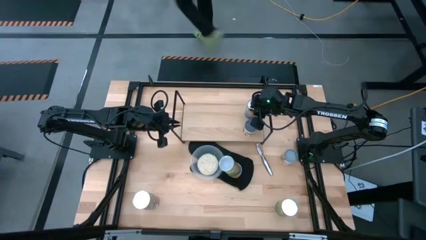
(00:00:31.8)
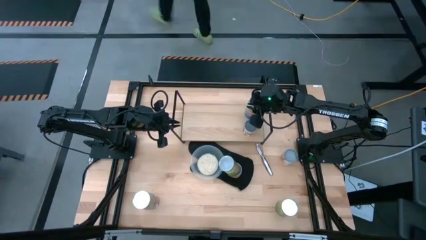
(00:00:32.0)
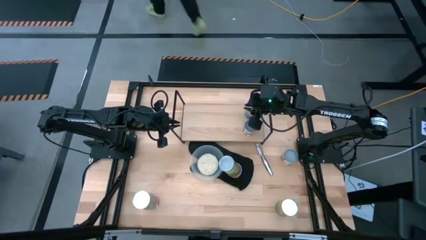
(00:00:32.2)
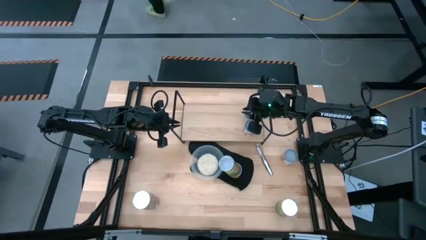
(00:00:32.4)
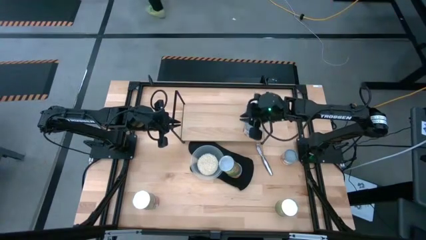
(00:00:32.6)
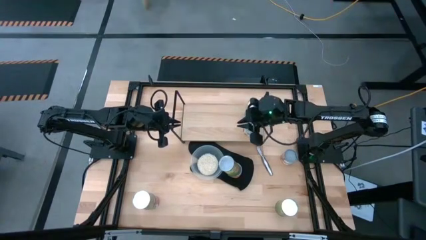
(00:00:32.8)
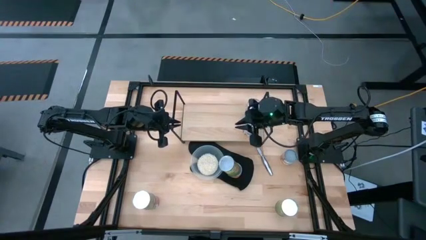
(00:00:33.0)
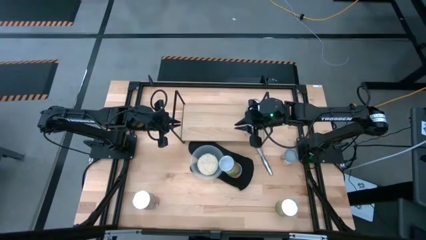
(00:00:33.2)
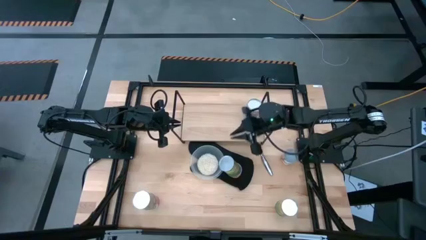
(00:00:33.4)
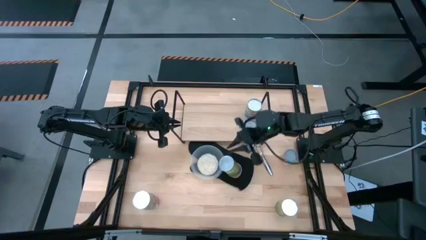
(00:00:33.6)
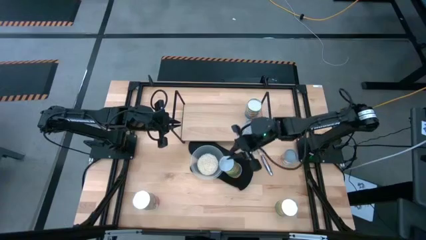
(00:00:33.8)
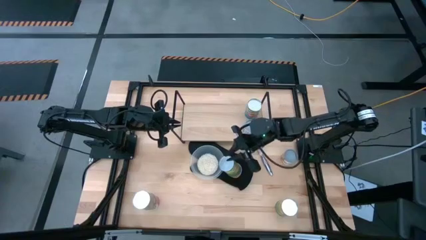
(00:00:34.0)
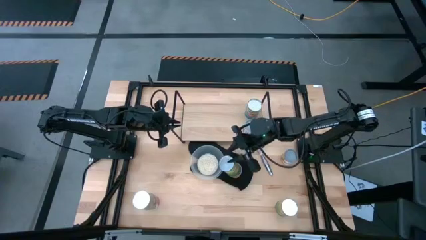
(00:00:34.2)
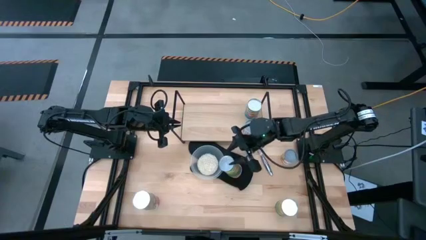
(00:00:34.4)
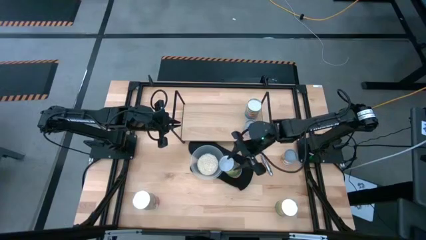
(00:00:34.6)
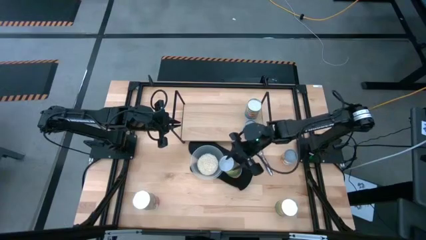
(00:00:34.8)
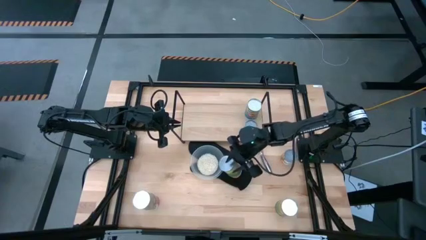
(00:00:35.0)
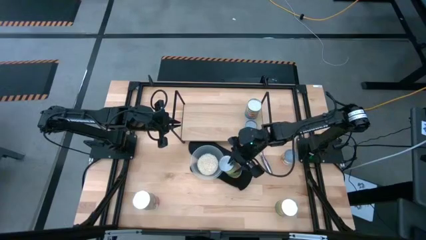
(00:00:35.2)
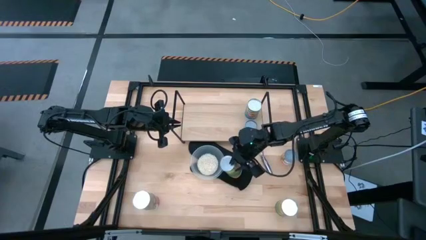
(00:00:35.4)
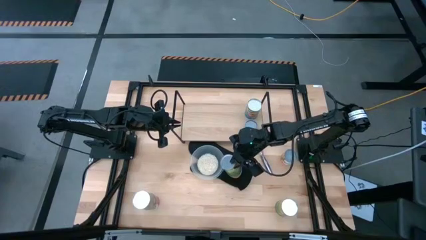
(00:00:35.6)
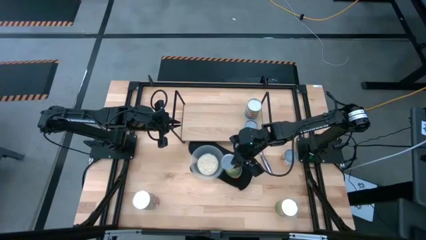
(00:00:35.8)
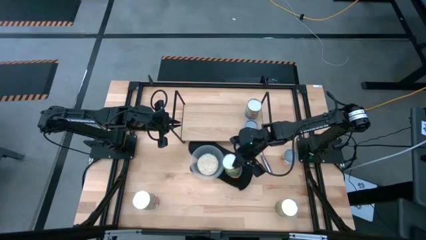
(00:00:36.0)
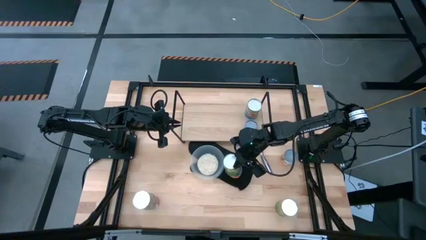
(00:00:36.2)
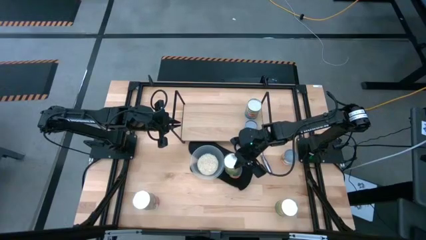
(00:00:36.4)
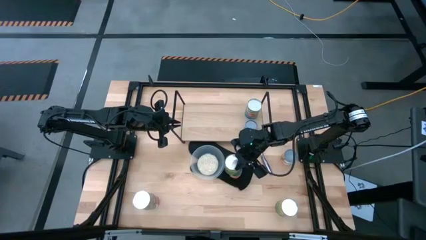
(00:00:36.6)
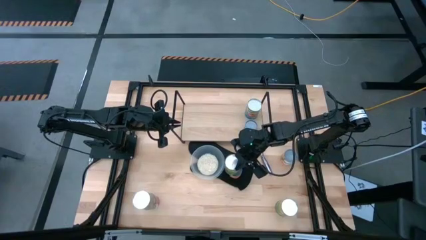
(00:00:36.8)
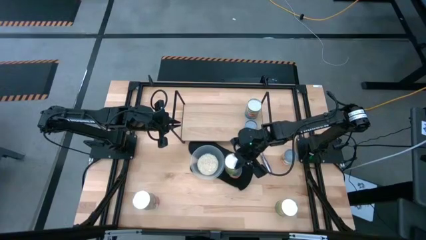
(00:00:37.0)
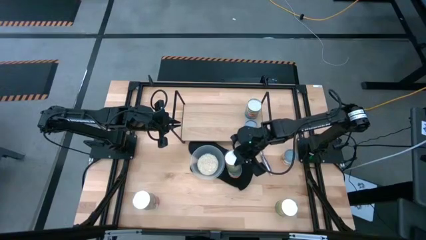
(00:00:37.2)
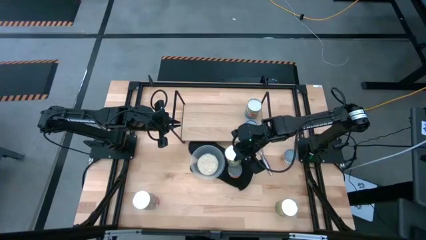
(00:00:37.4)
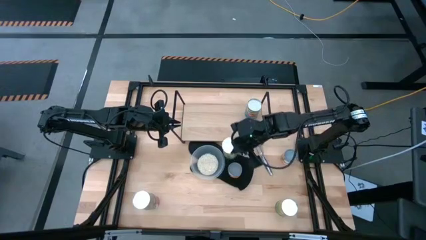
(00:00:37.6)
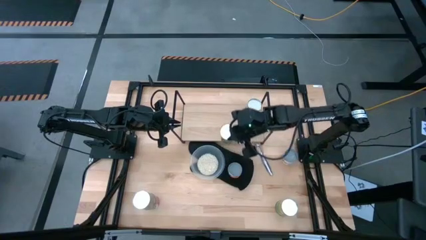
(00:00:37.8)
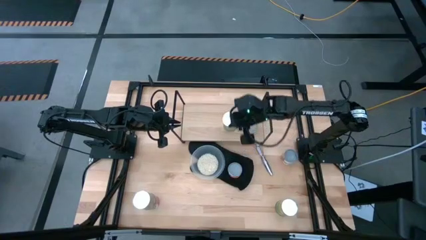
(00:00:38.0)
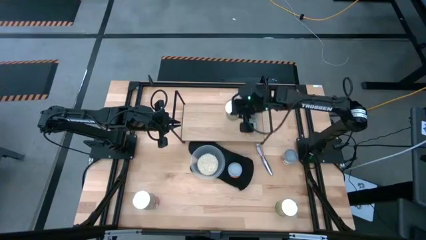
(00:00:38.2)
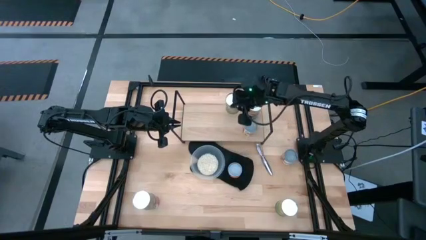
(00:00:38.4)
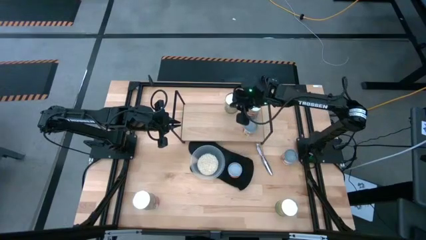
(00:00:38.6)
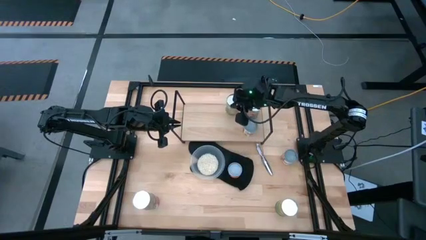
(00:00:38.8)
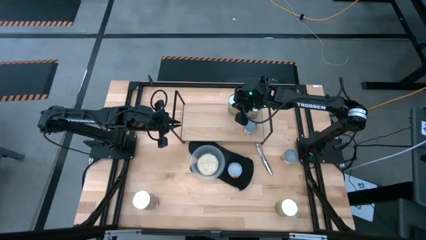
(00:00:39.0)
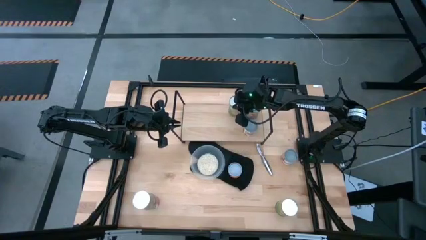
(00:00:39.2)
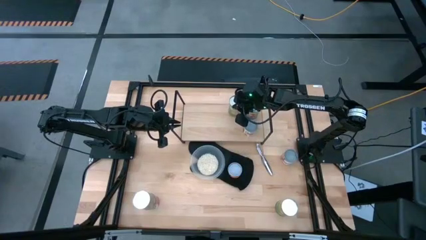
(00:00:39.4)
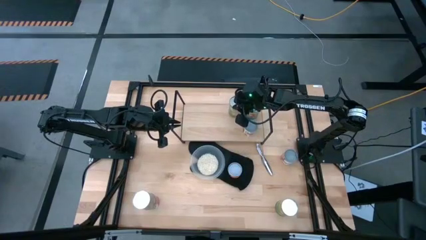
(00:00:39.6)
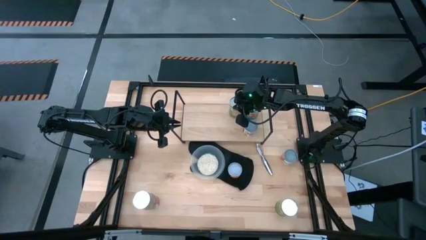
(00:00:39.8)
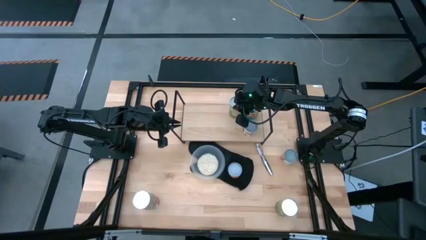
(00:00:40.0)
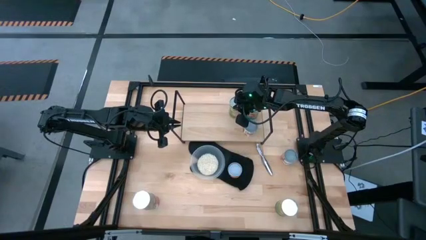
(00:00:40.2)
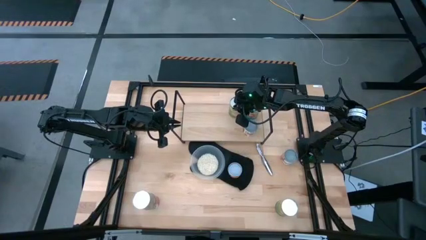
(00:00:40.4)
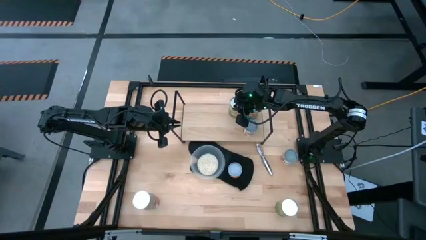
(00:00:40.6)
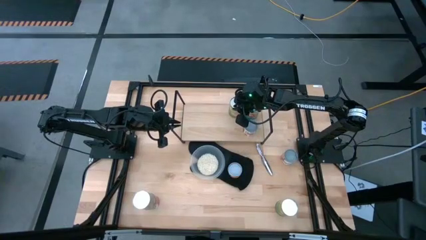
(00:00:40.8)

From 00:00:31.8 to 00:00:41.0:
Task: Pick and place cans onto a shelf
Put the large canned orange on the shelf

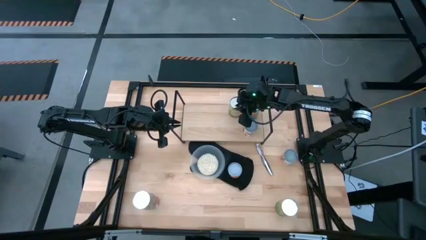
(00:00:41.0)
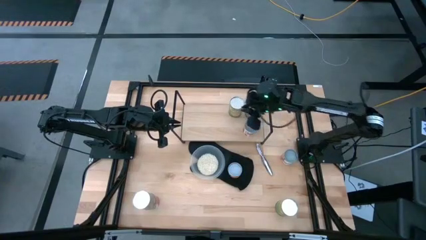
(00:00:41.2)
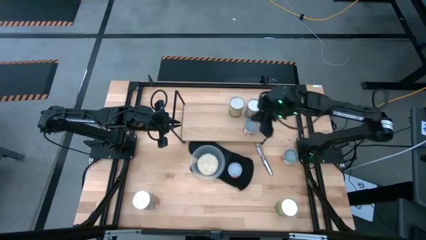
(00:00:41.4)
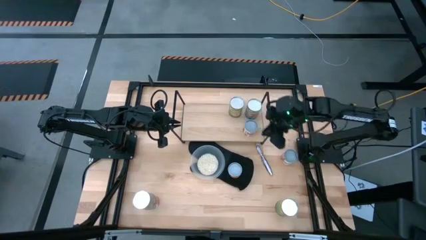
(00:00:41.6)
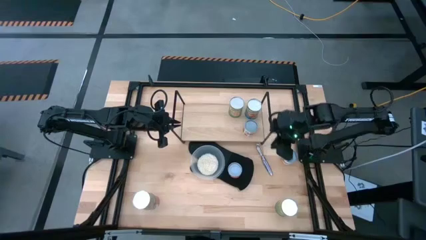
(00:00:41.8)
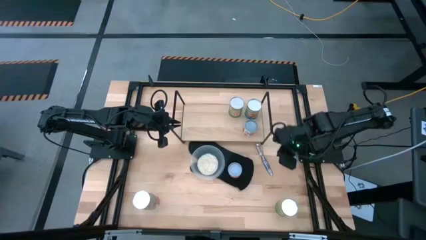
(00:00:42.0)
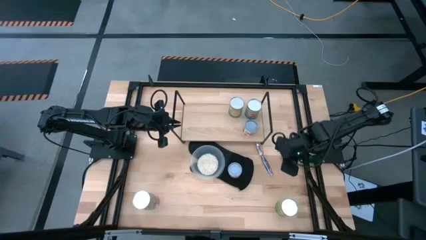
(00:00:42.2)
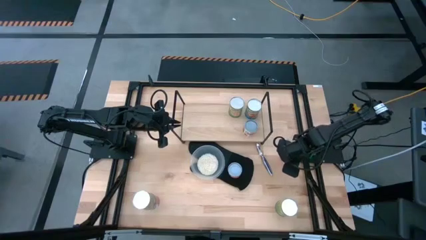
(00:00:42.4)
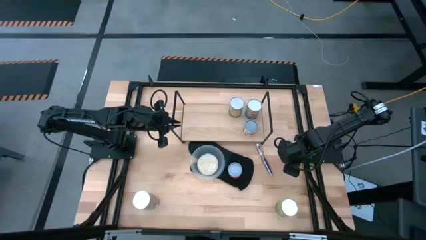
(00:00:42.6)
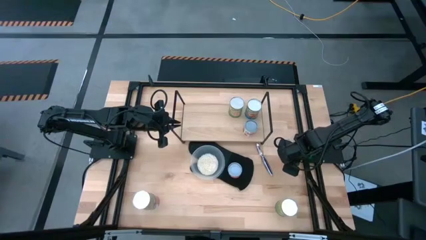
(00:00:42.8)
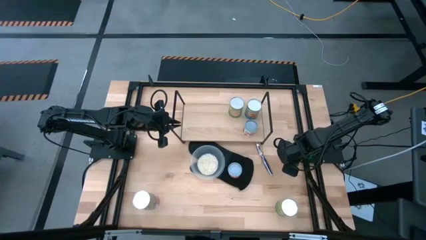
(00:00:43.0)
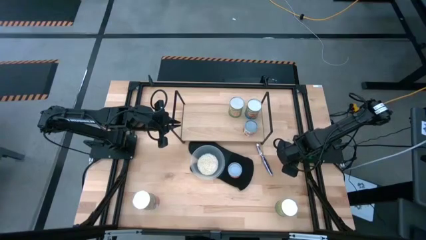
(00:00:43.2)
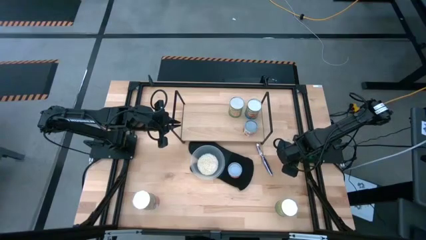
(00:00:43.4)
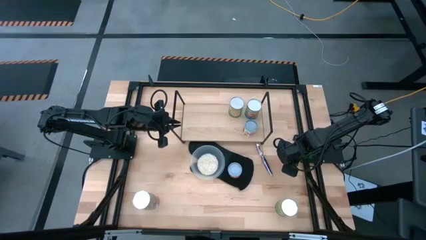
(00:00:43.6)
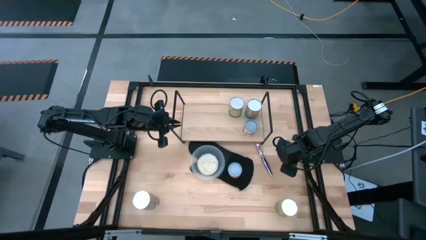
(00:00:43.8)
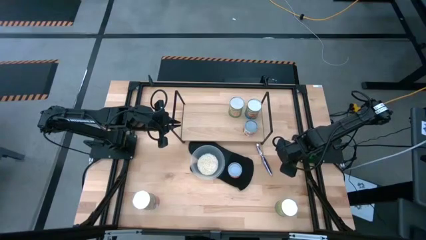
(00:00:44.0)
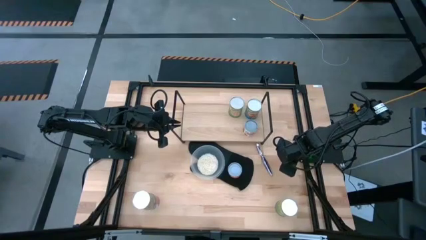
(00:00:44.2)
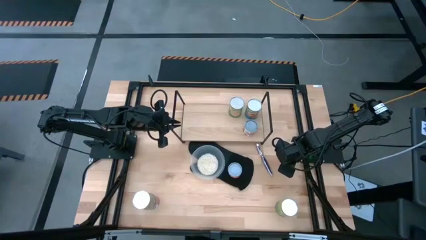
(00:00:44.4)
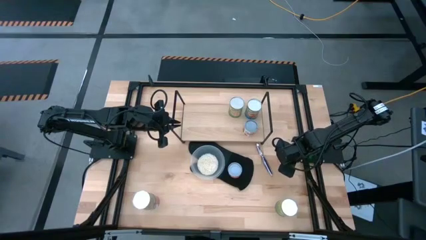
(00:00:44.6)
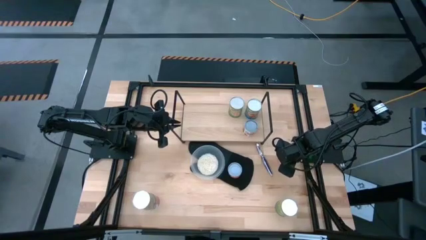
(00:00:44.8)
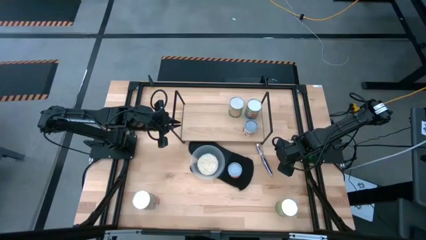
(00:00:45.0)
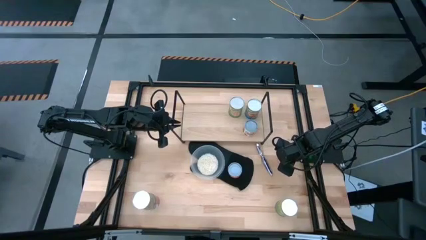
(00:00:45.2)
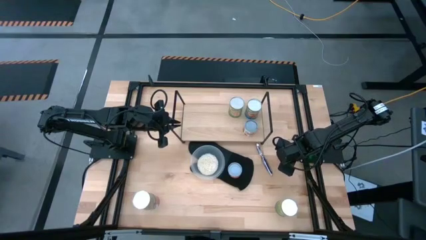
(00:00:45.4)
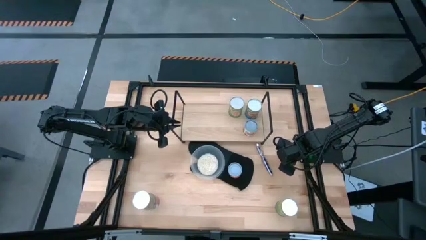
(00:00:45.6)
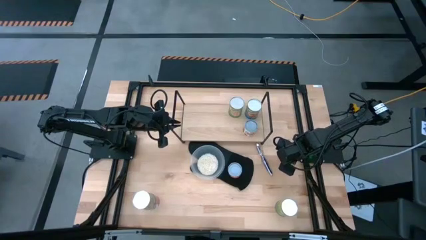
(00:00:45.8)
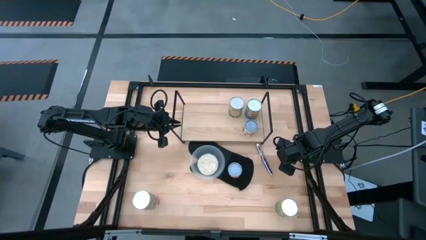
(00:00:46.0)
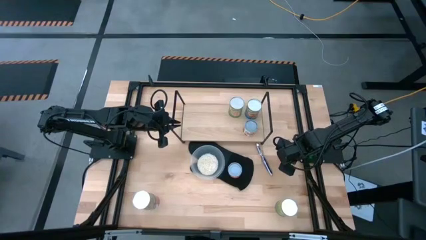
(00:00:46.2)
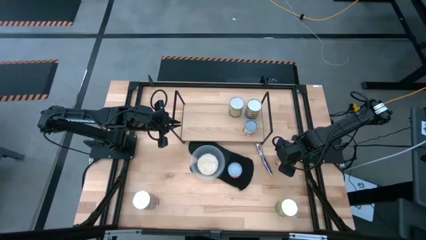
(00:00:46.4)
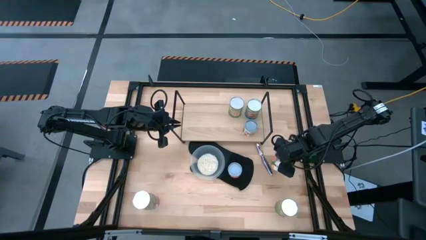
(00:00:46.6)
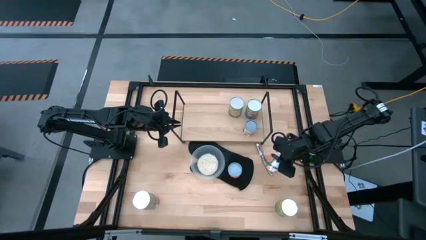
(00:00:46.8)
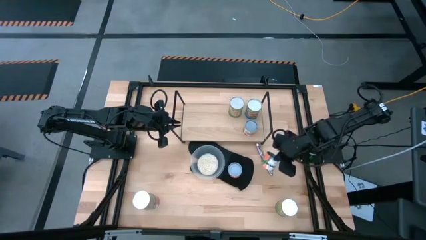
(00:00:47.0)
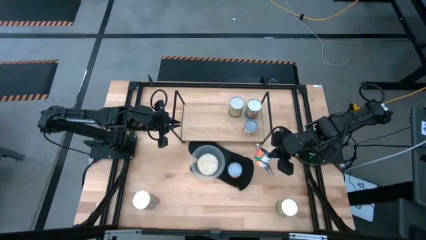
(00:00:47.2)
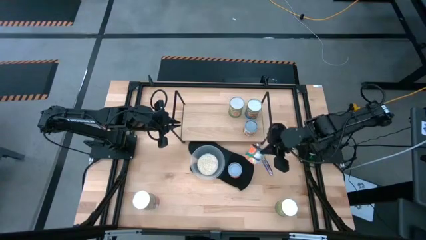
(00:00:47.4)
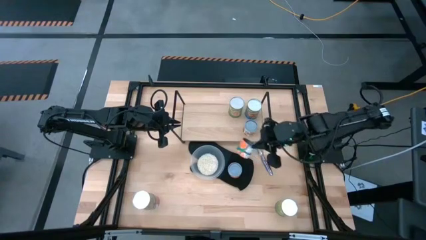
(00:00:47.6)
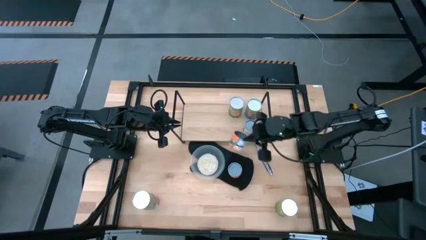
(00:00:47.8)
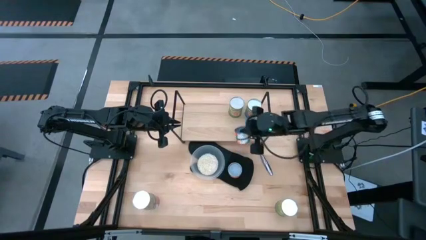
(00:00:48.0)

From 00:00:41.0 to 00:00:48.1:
Put the small canned oranges on the shelf
